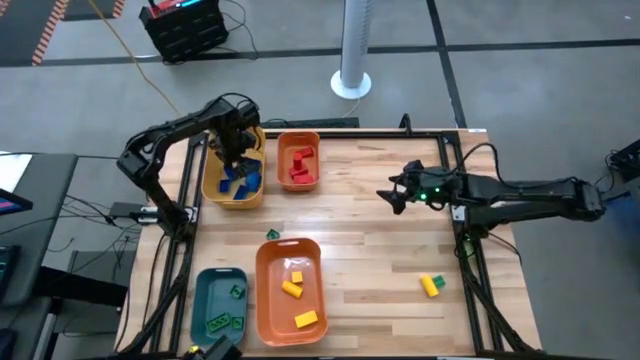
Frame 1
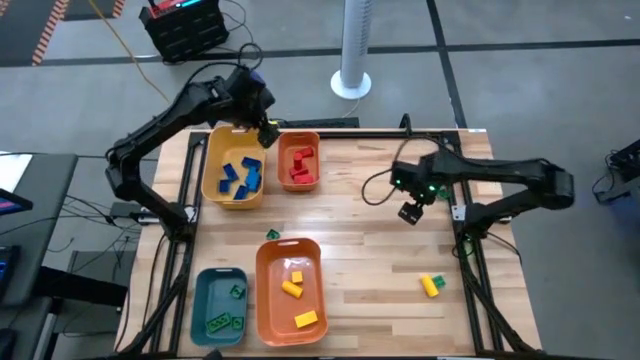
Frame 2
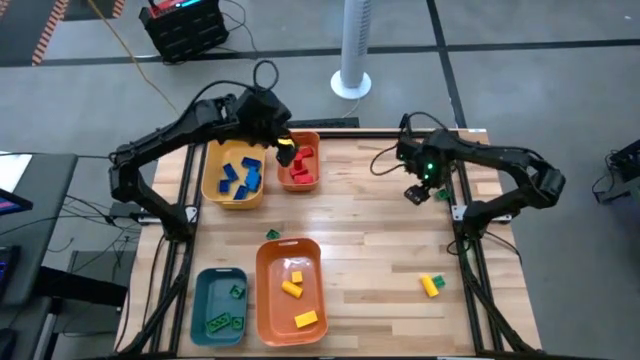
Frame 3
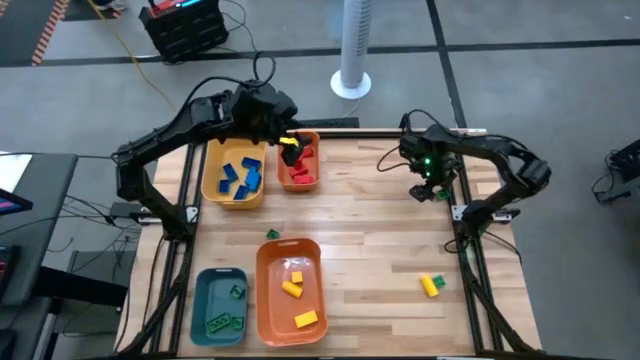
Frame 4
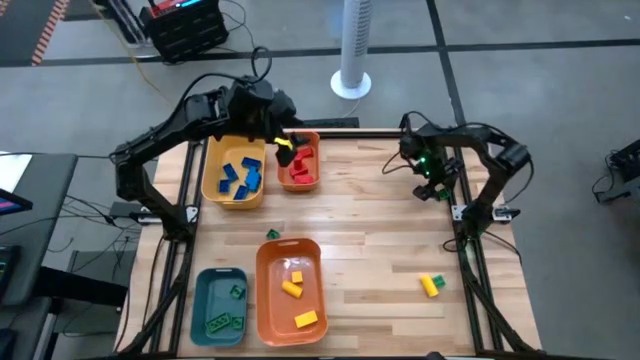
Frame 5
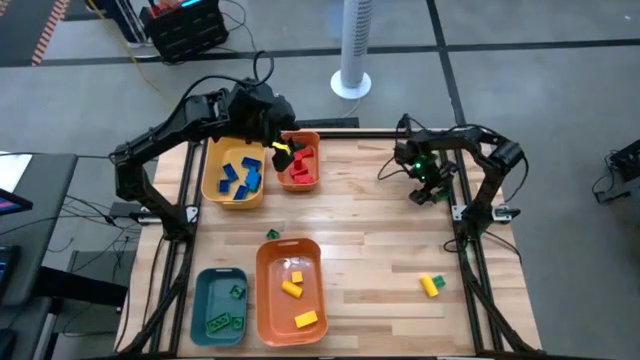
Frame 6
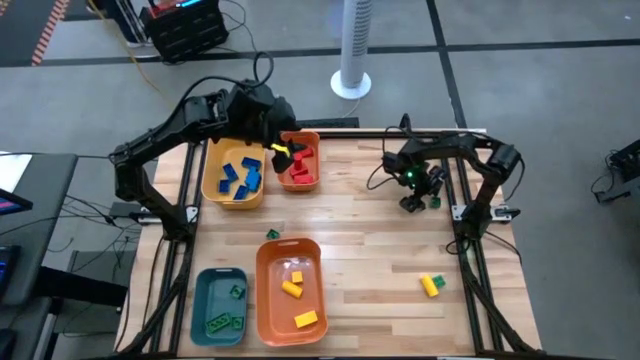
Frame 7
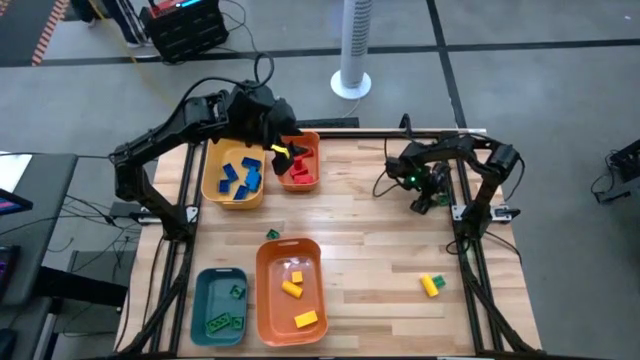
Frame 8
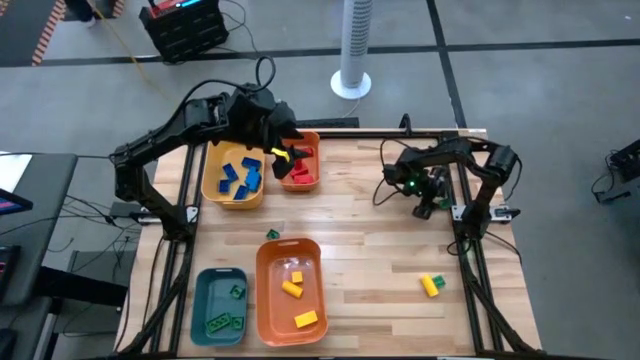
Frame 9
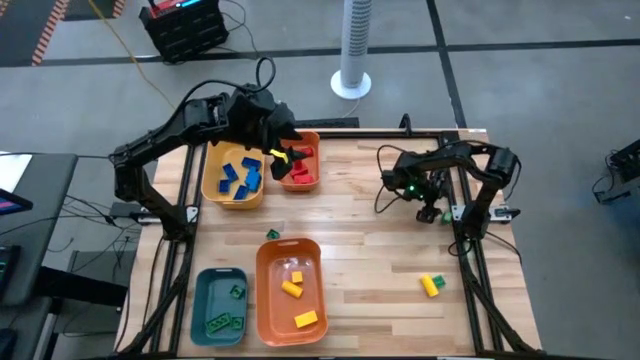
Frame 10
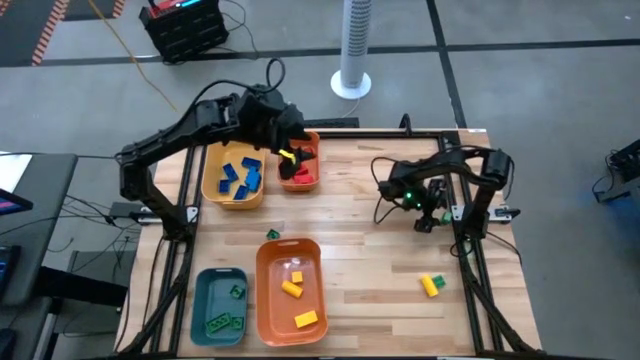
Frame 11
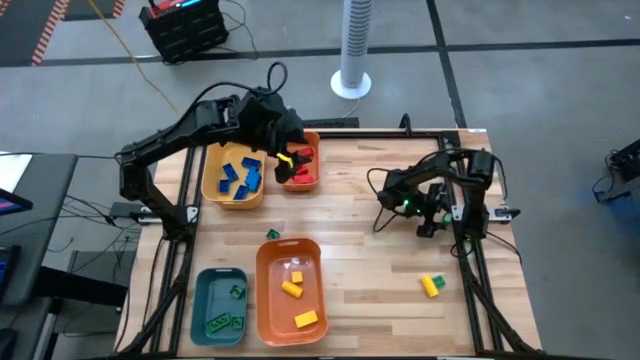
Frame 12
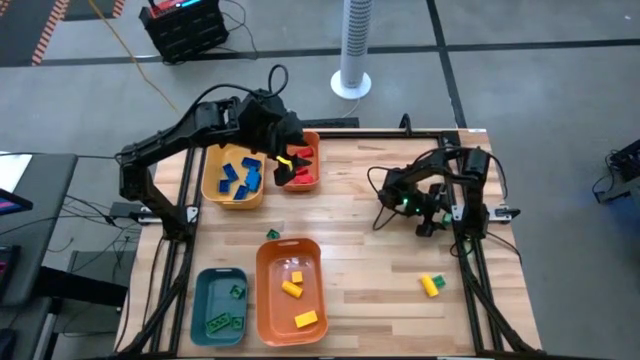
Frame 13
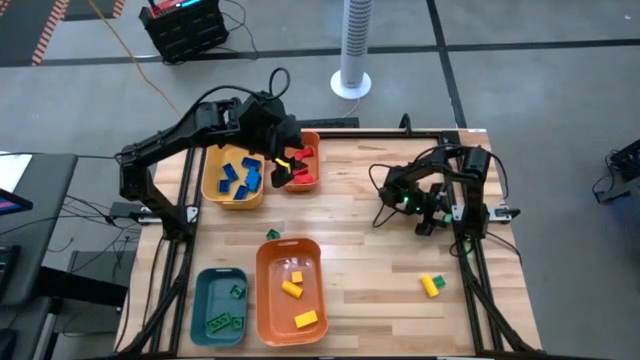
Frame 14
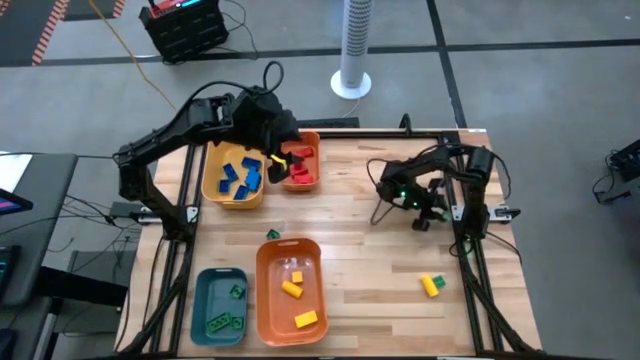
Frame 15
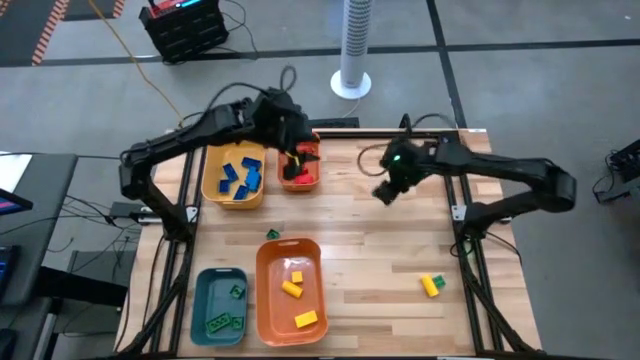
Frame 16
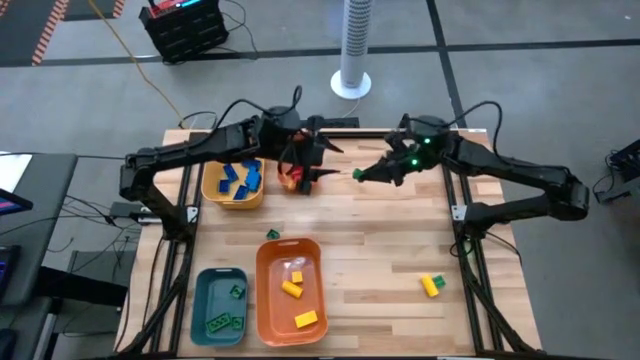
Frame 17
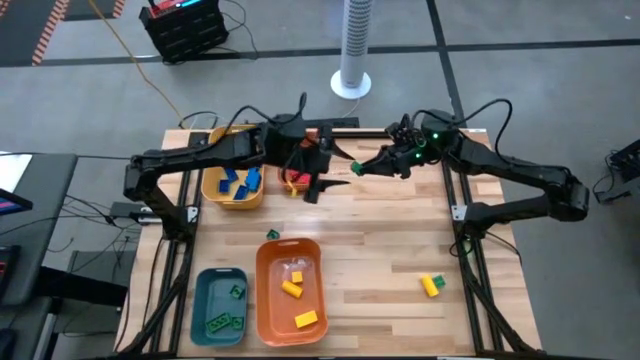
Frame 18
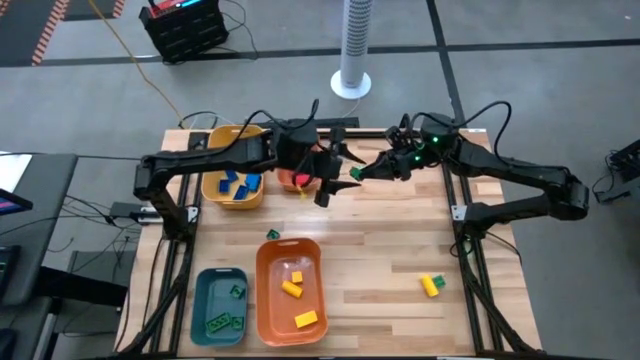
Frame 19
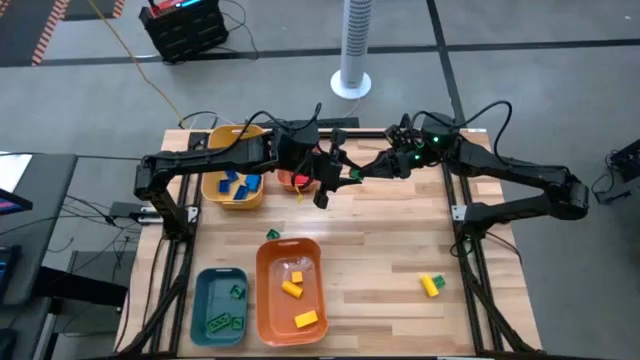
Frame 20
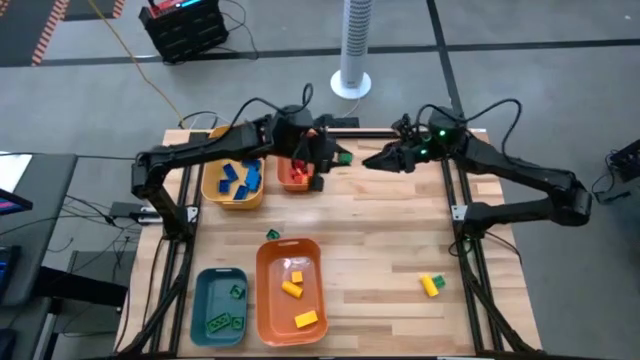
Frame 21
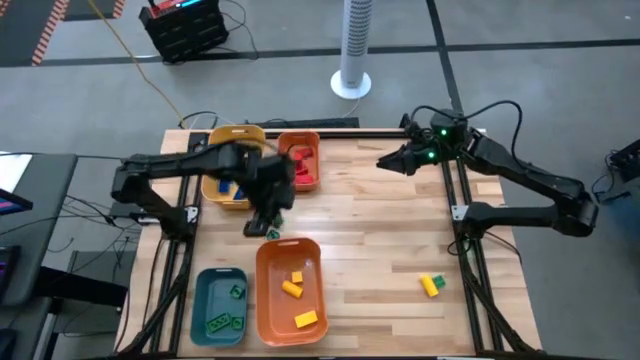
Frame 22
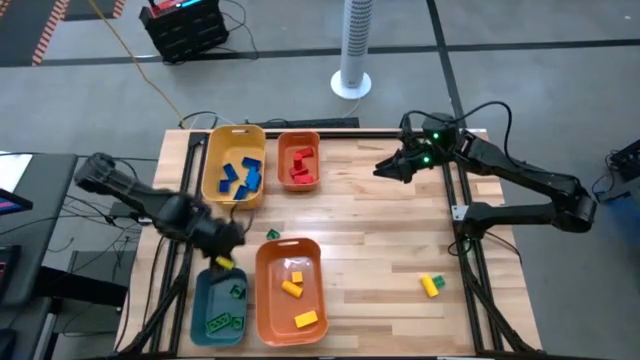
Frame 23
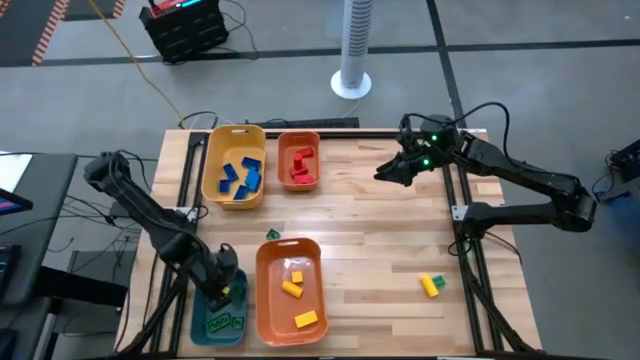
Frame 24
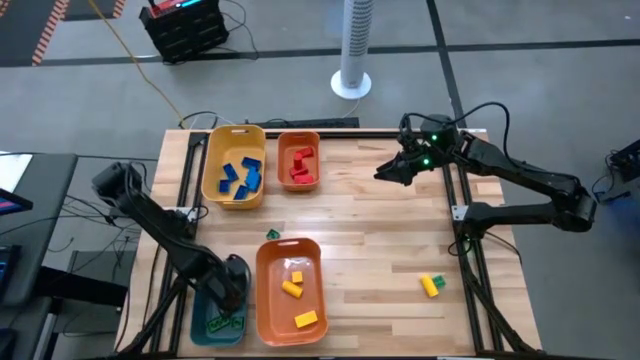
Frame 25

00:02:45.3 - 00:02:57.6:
Task: Sort blocks
Put the green game piece into the blue bin Put the green game piece into the blue bin

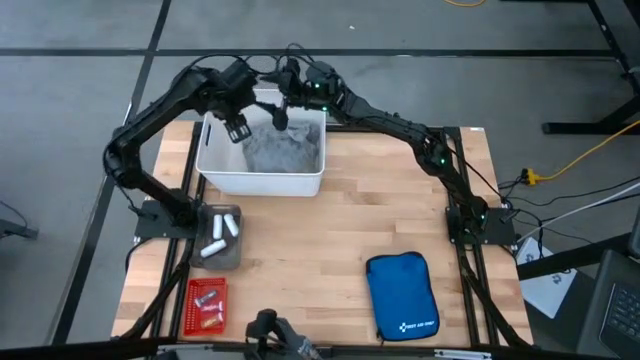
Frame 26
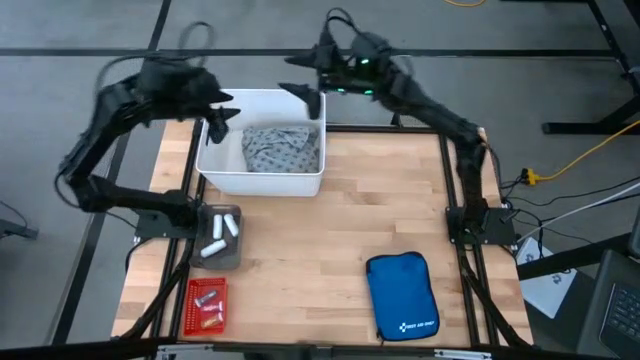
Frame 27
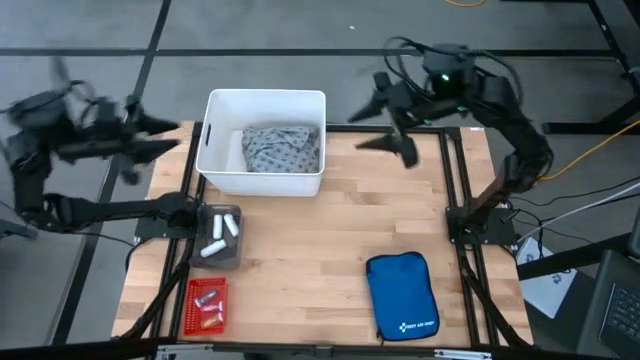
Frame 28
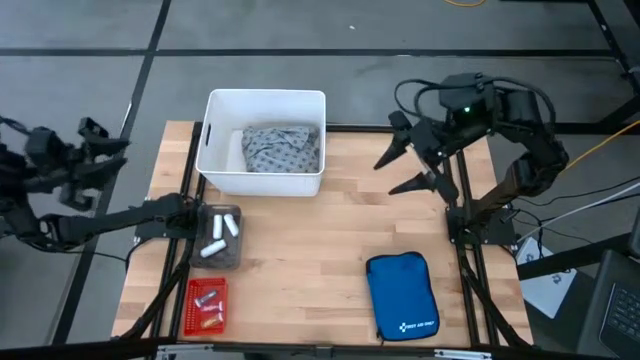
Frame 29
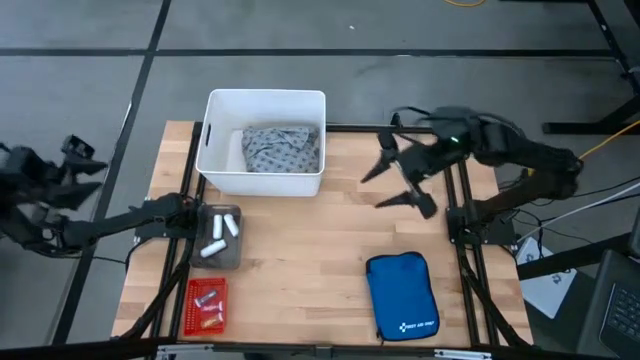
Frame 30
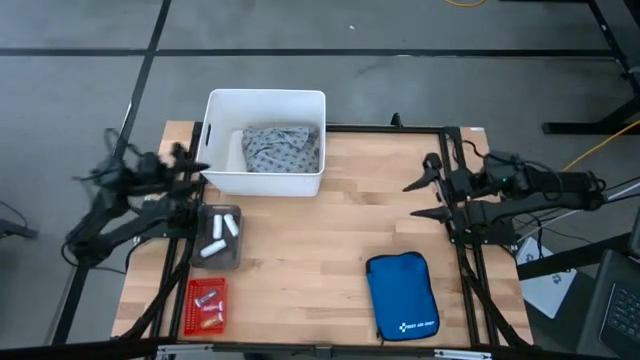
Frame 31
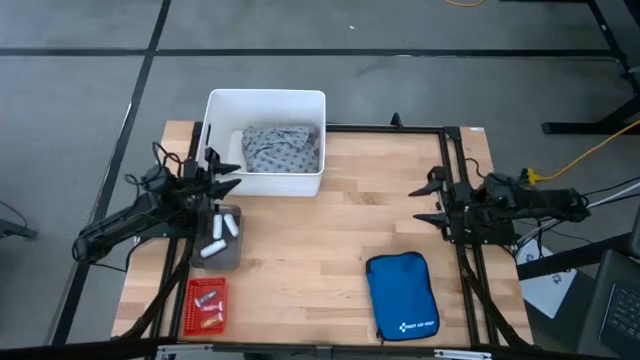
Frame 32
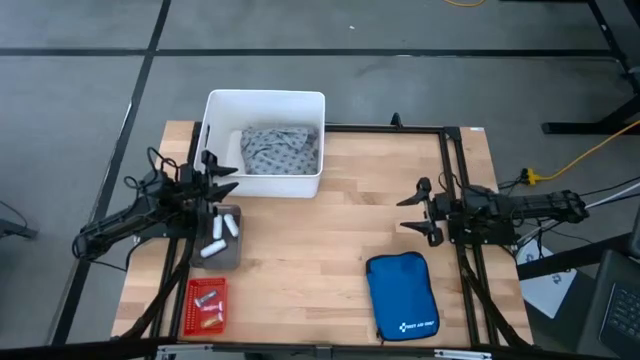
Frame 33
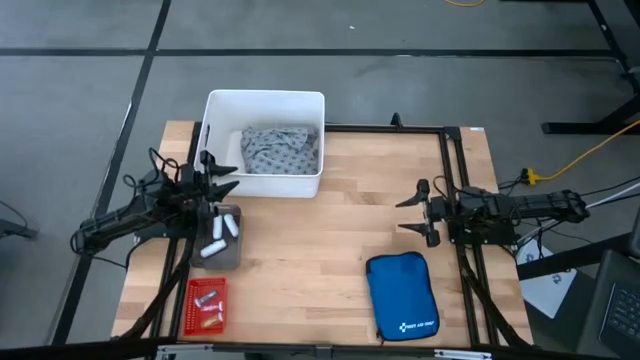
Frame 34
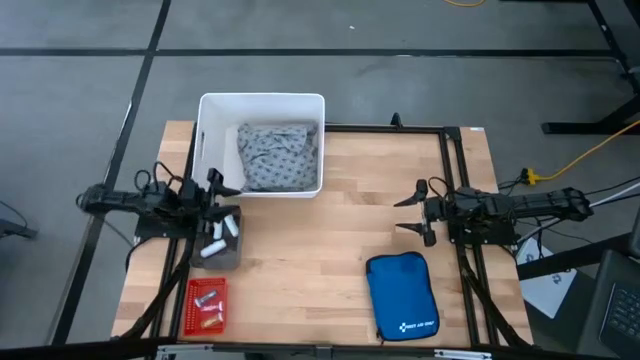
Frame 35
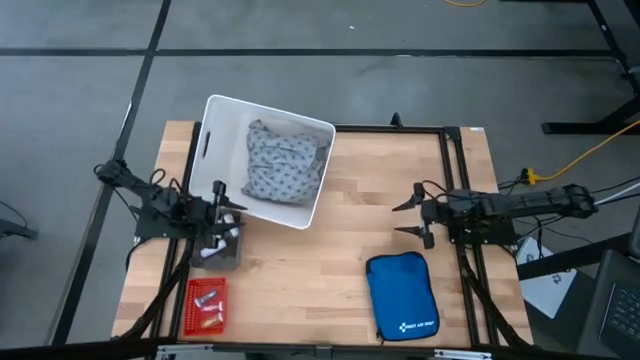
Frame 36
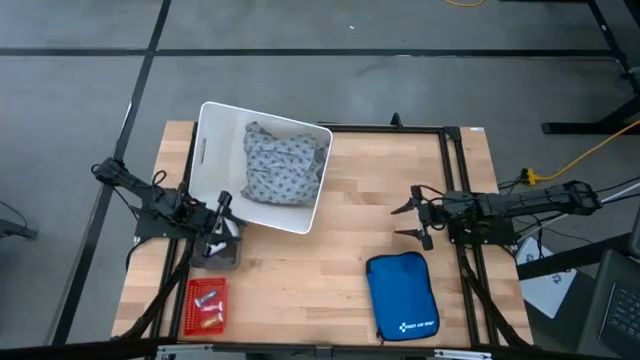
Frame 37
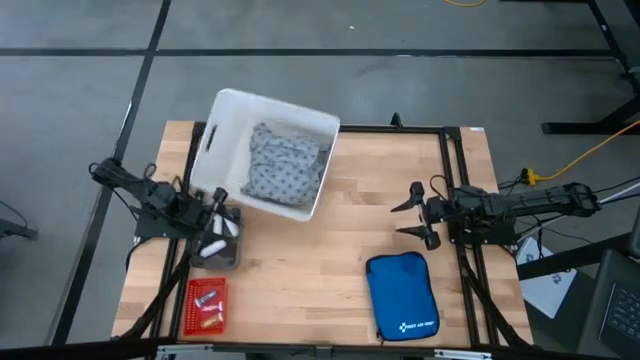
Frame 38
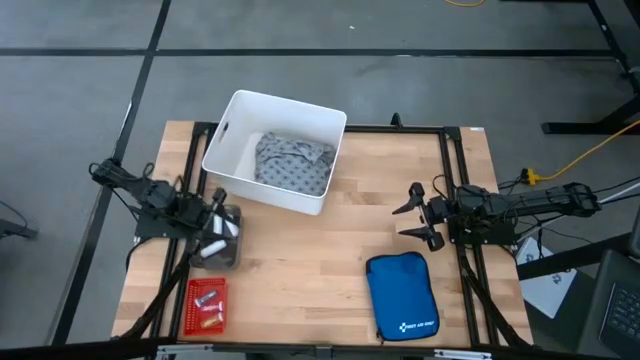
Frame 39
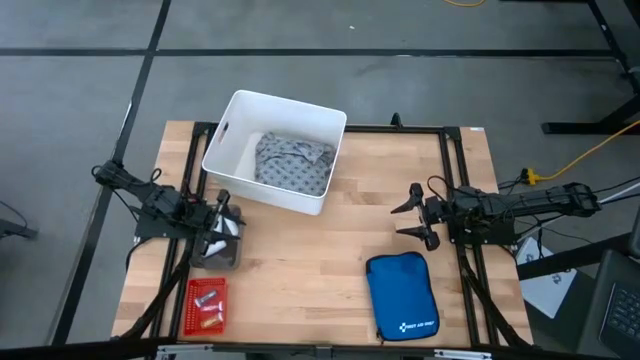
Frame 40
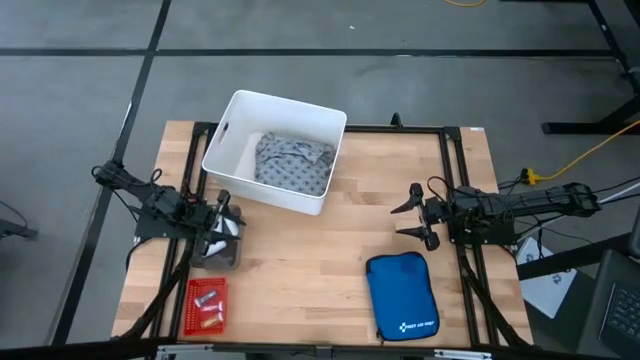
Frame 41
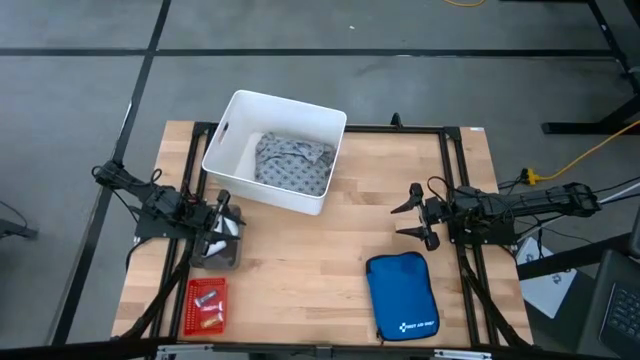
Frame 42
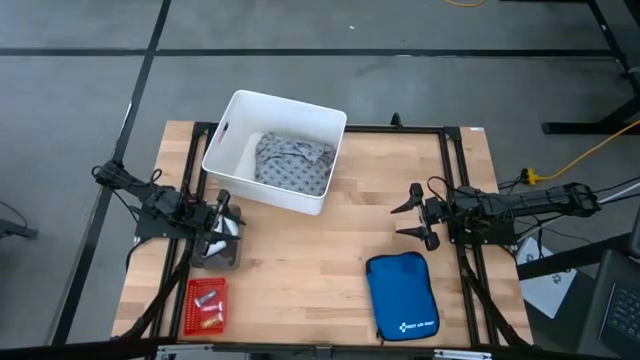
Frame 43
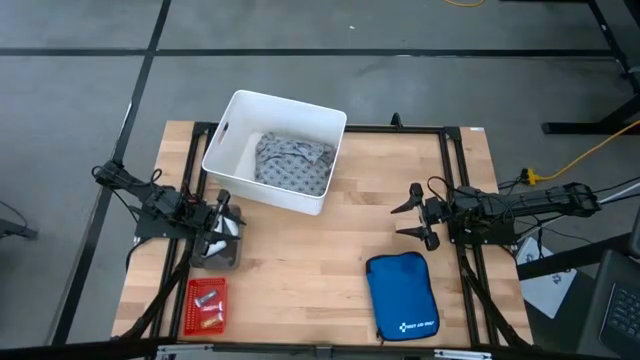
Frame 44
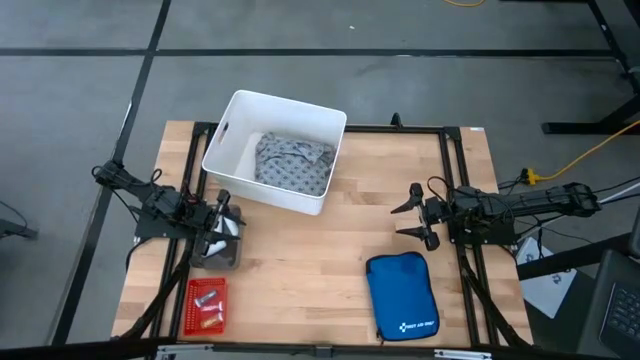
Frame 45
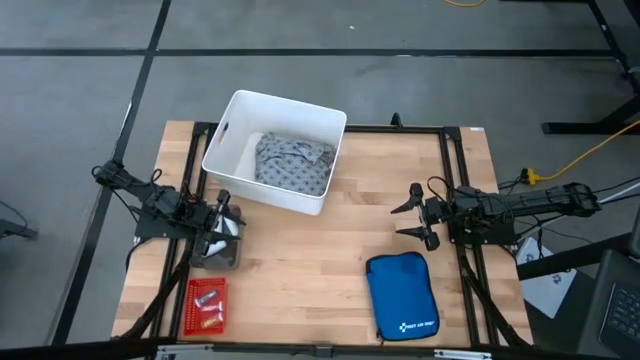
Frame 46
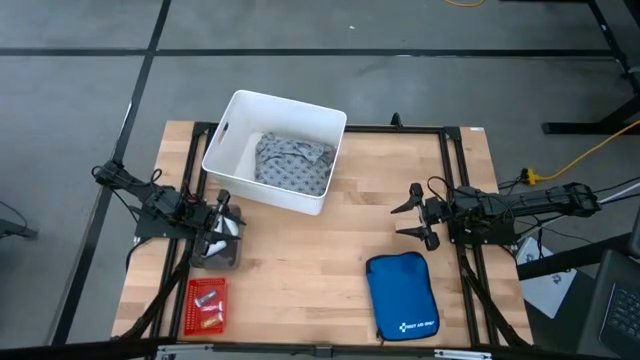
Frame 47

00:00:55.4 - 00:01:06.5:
Task: Pick & place medical supplies in basket/bin
Return to Home Position
